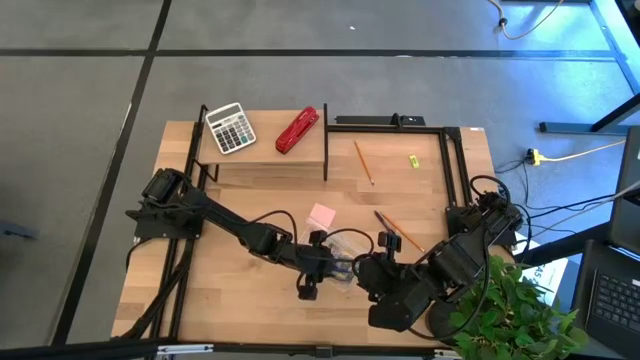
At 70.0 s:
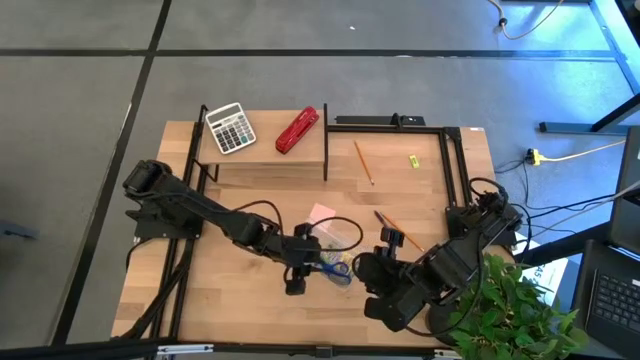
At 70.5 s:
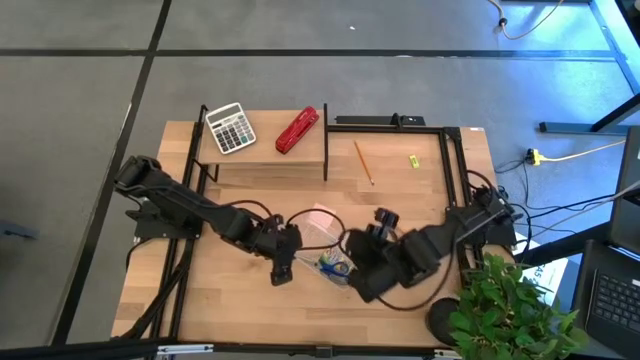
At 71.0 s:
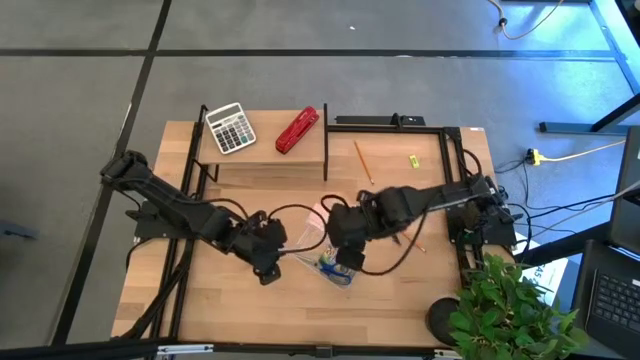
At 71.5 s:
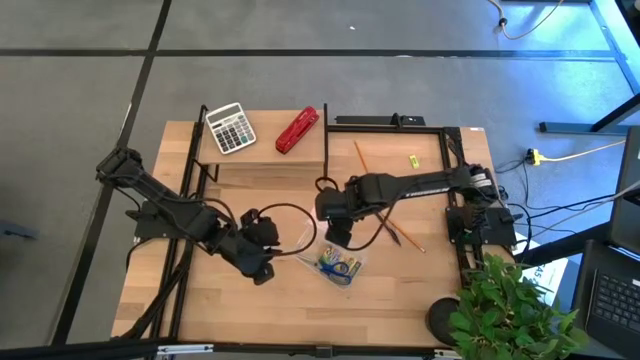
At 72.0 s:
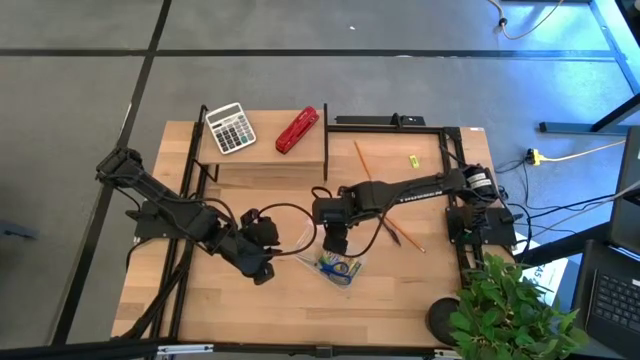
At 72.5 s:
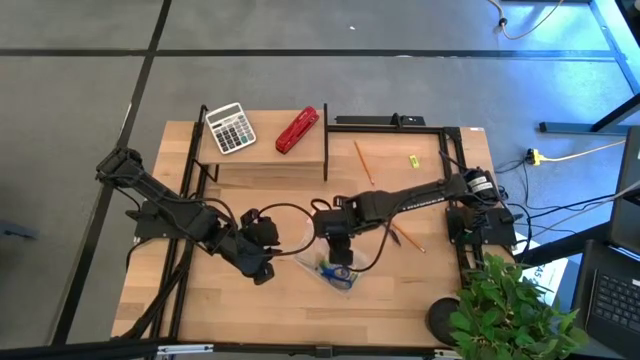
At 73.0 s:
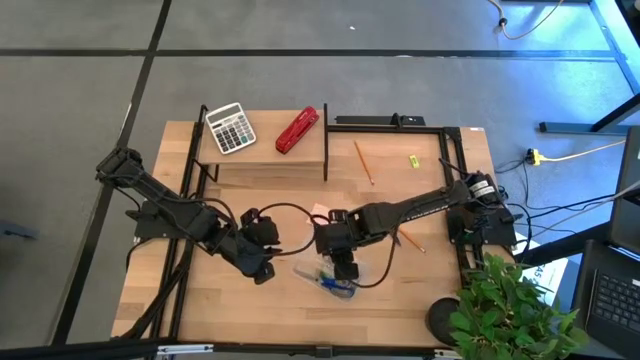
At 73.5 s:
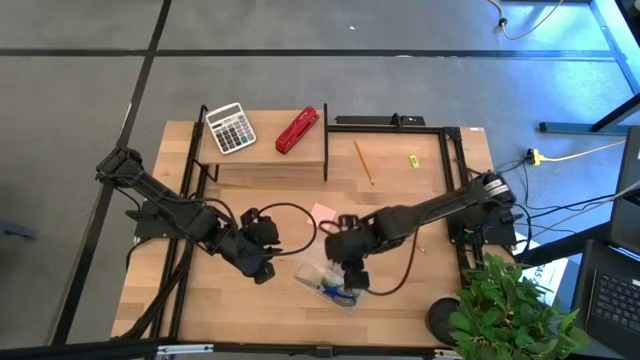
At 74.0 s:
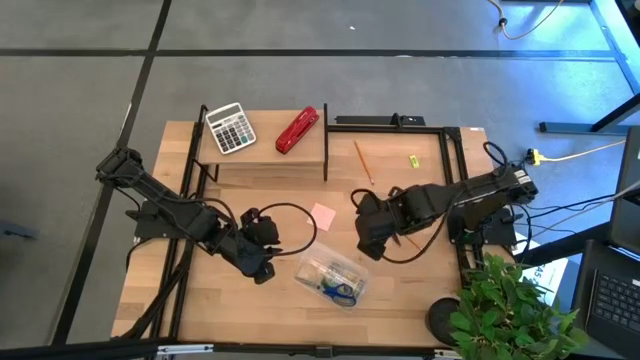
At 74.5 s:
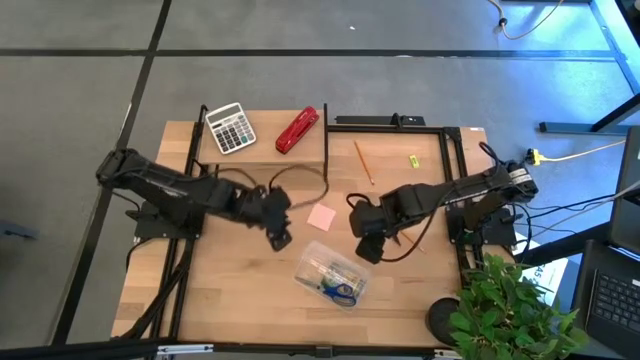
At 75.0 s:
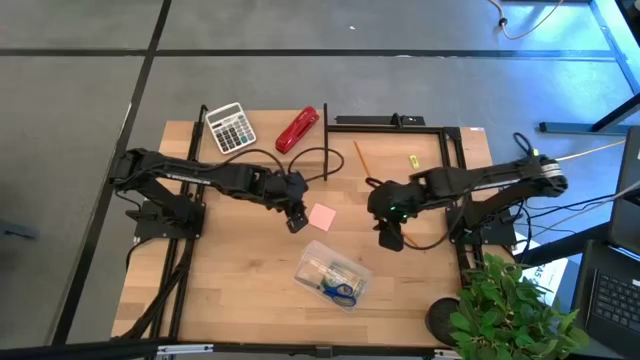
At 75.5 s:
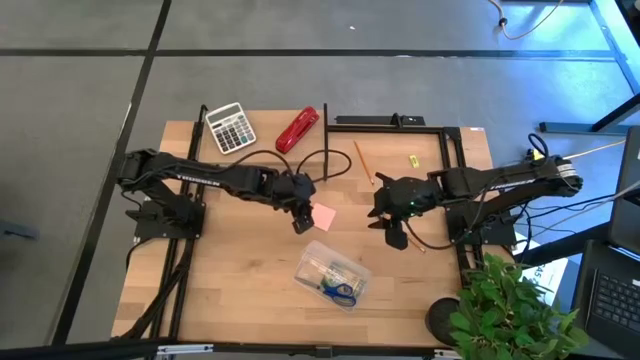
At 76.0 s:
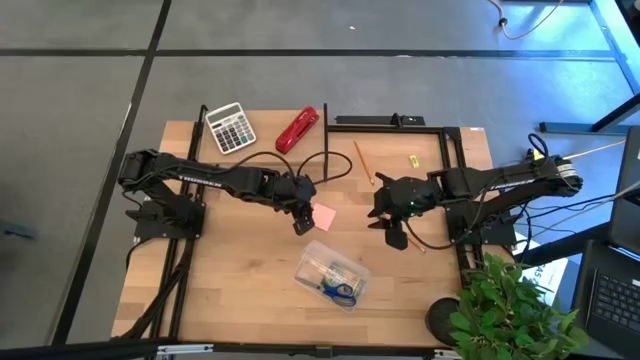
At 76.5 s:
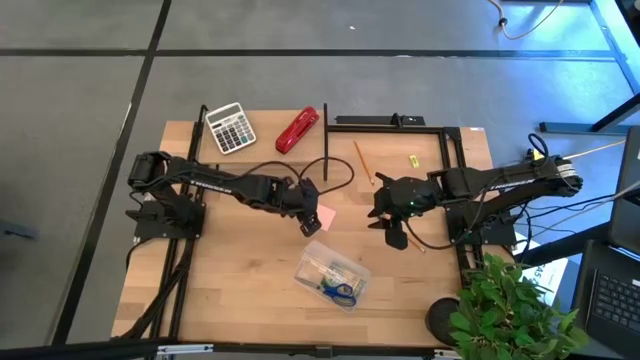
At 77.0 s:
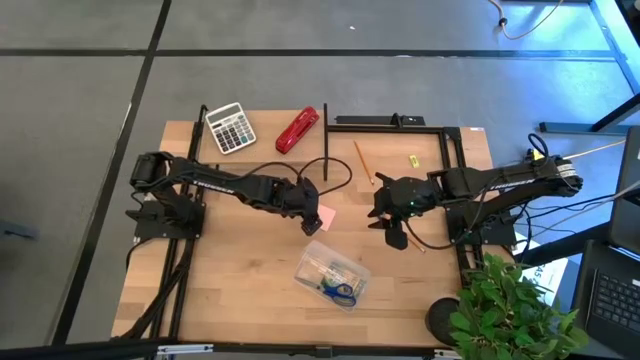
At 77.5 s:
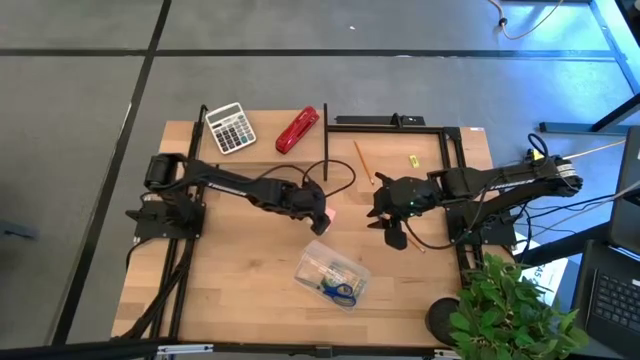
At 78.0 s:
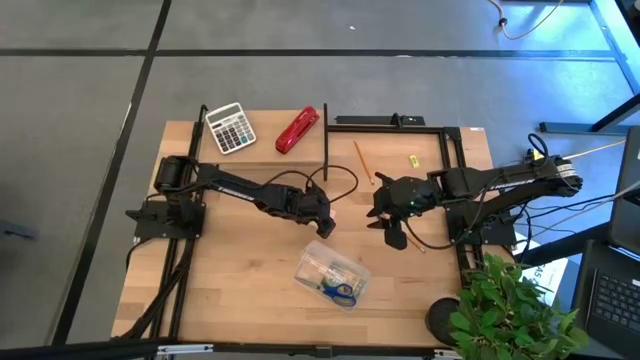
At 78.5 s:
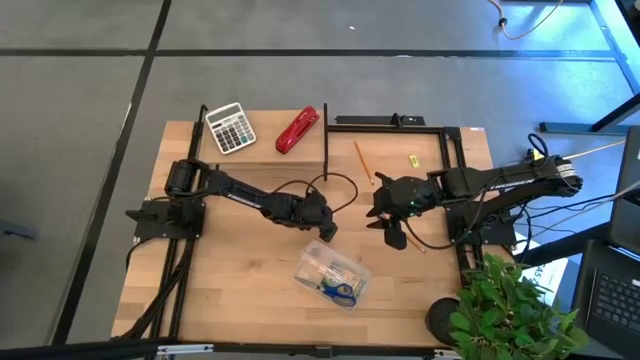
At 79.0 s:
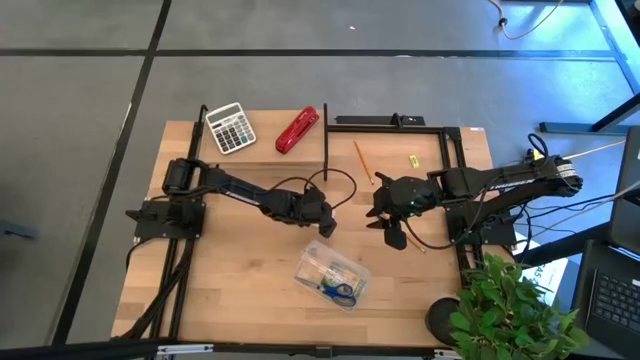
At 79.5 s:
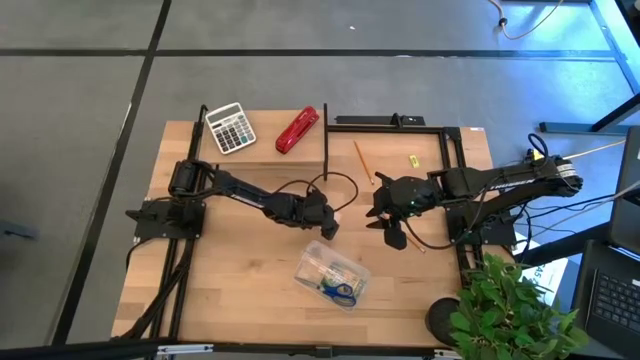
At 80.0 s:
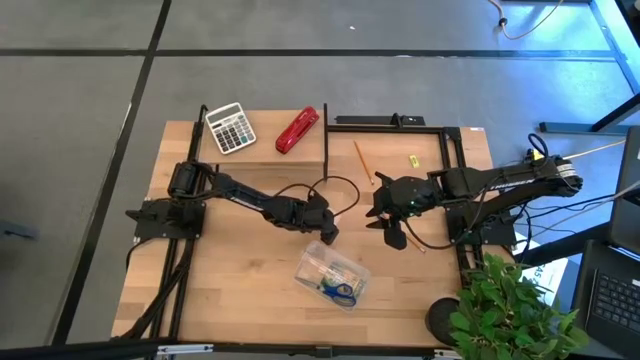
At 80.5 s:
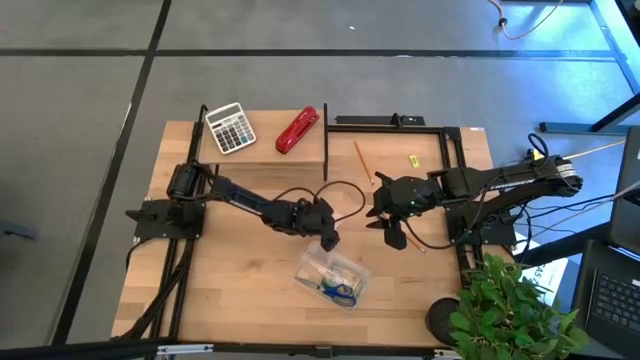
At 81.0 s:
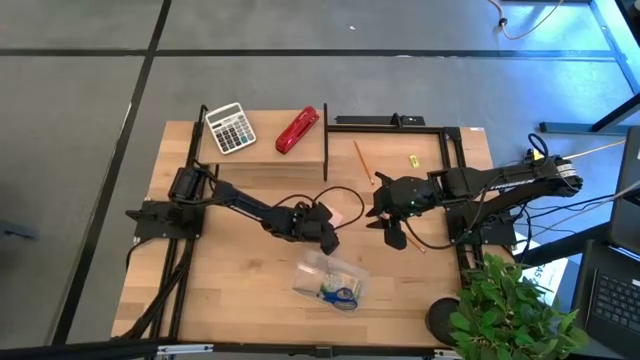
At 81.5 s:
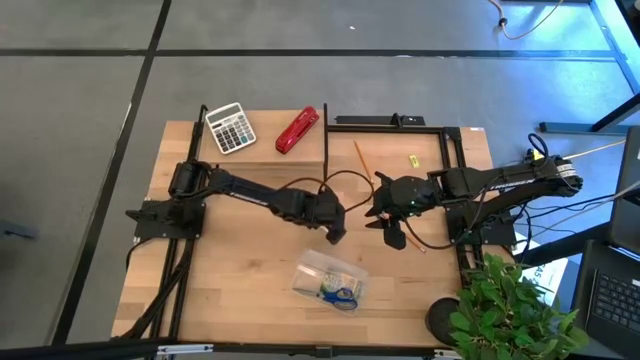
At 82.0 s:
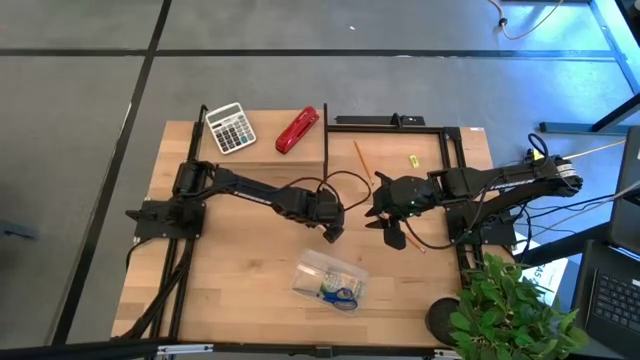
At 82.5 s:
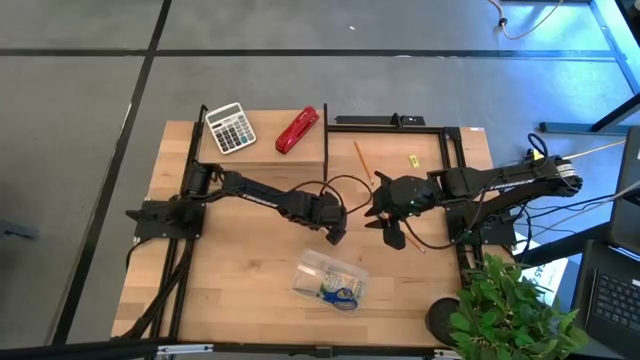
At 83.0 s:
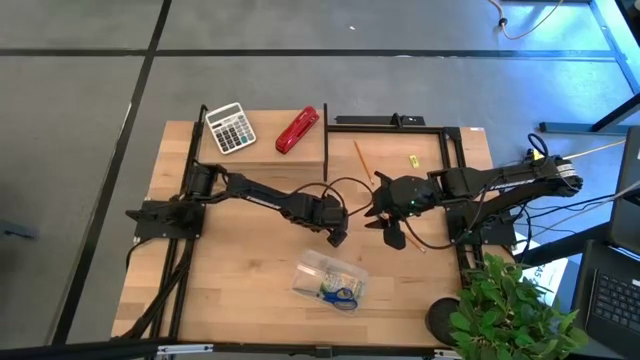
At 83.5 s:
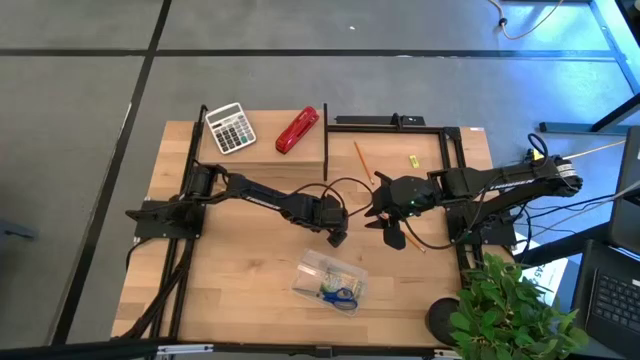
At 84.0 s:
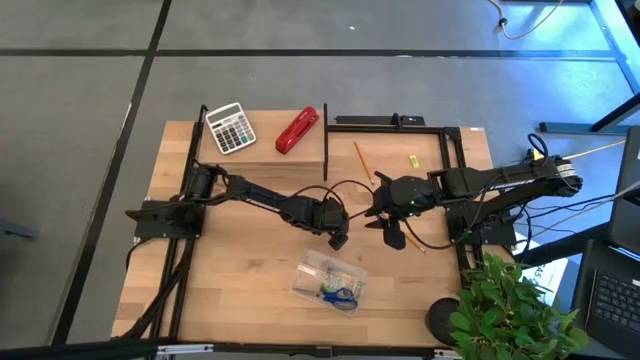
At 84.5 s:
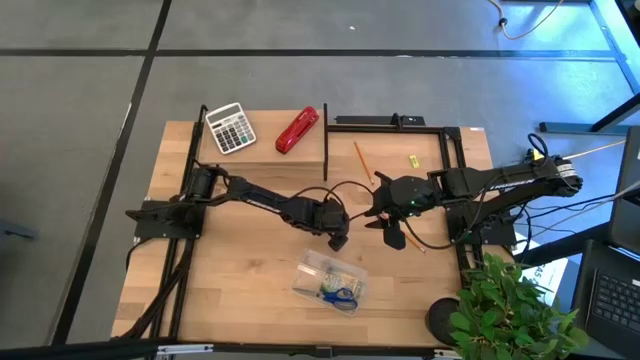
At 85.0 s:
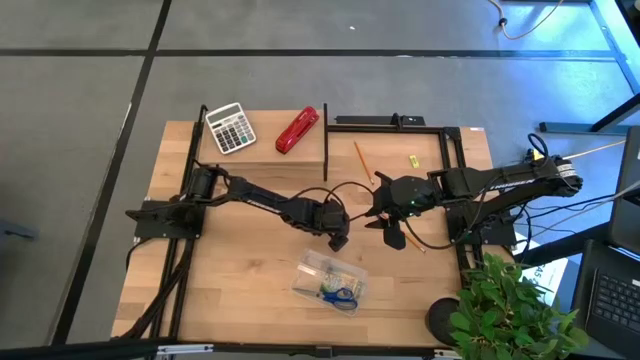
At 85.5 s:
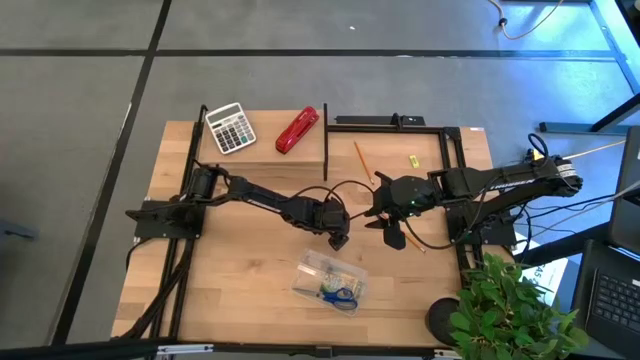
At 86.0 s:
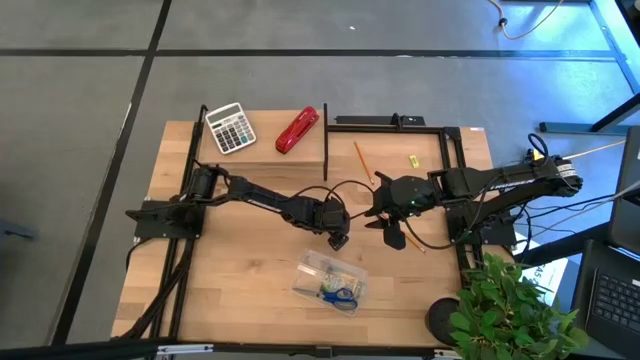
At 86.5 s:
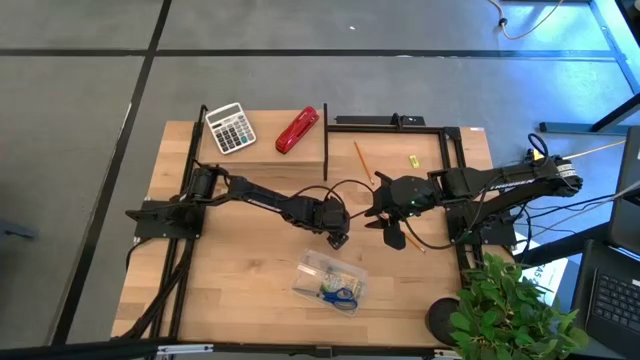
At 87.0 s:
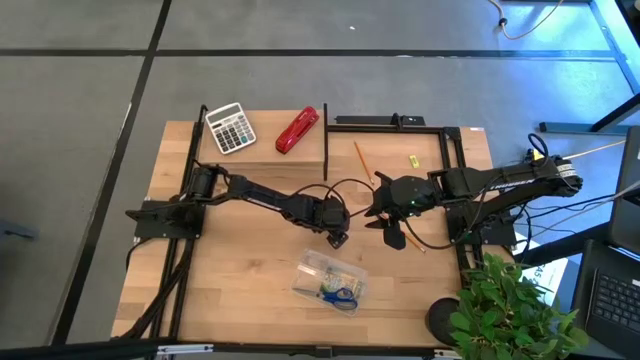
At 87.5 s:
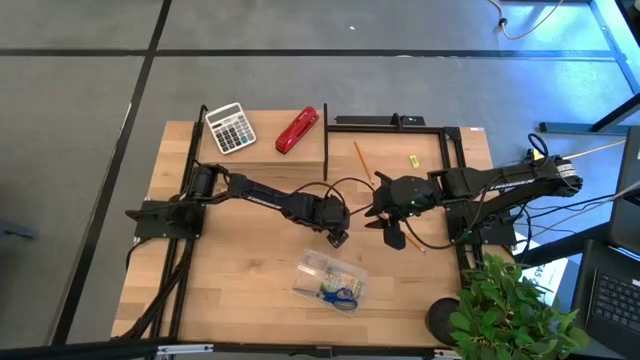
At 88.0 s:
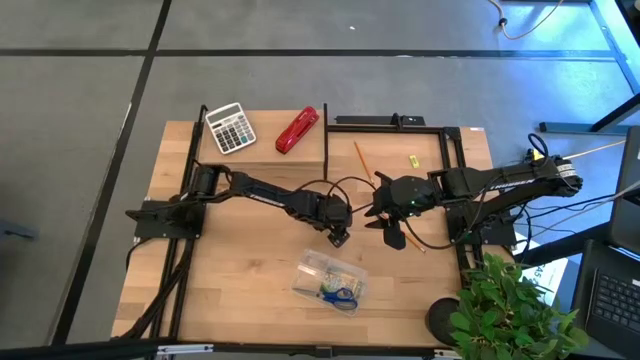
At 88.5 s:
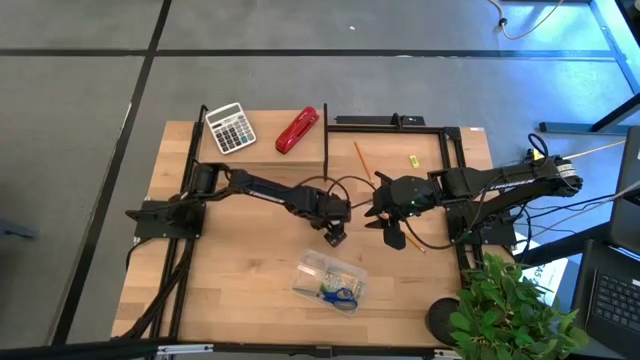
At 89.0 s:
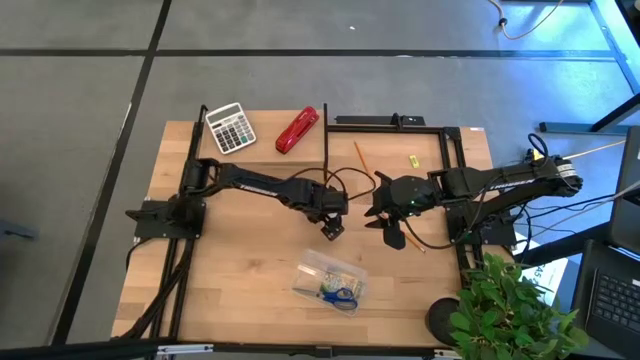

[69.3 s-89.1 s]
Task: Pack school essentials
Put the pink sticky note into the transparent supply box
